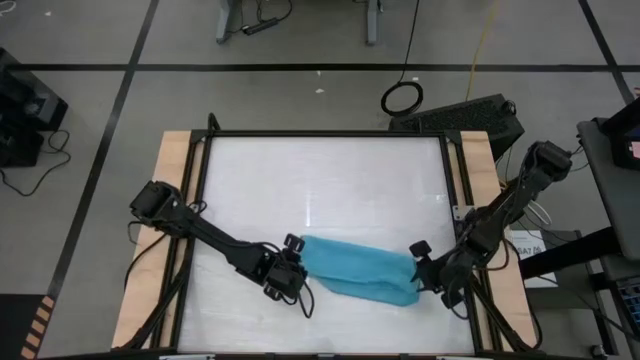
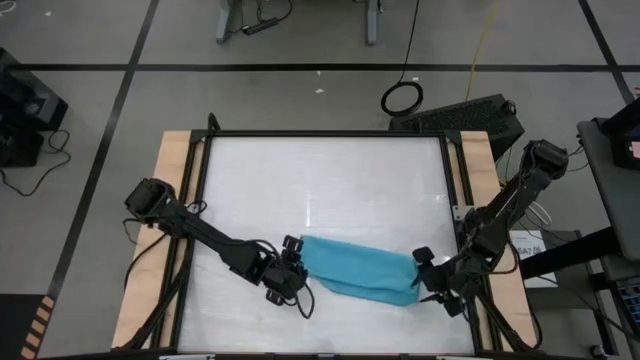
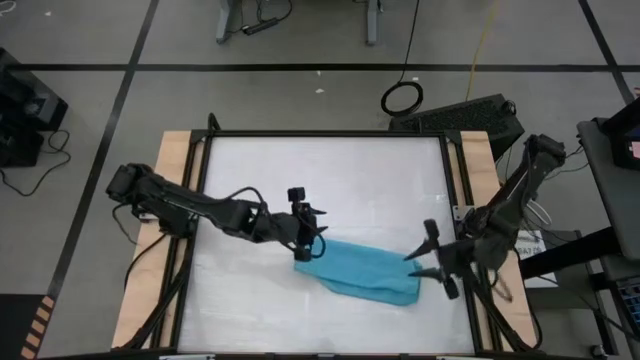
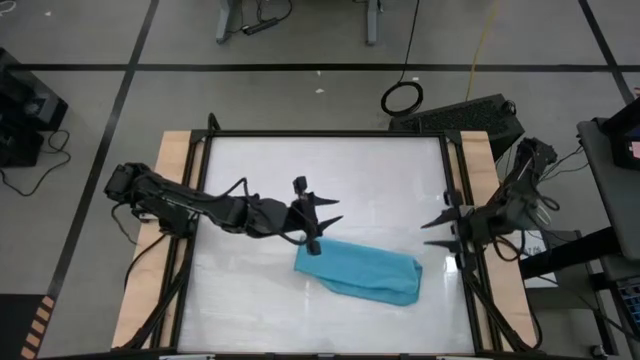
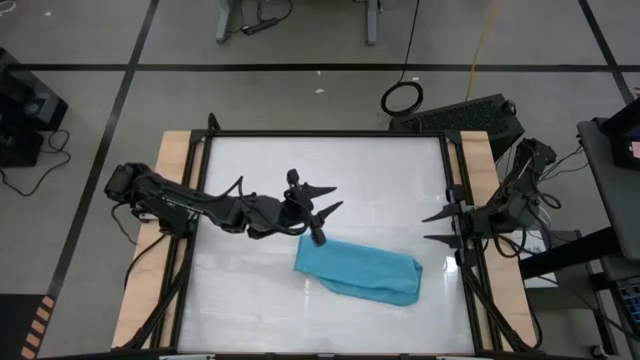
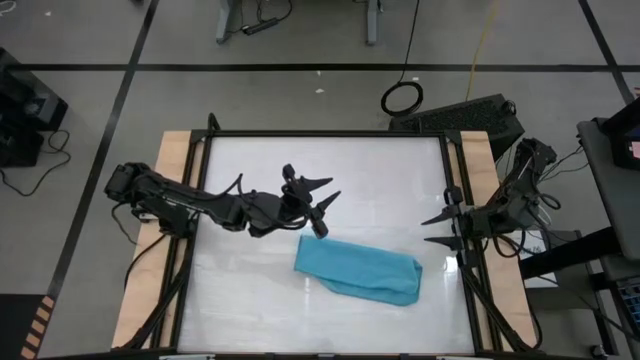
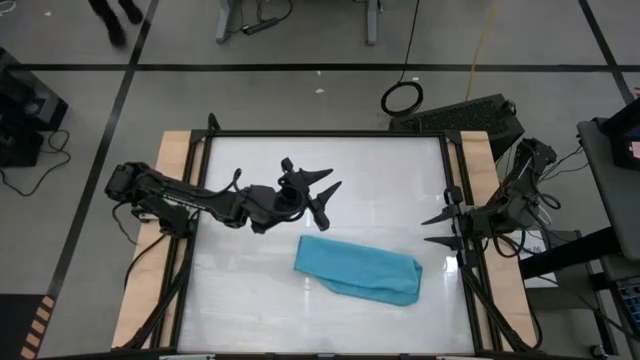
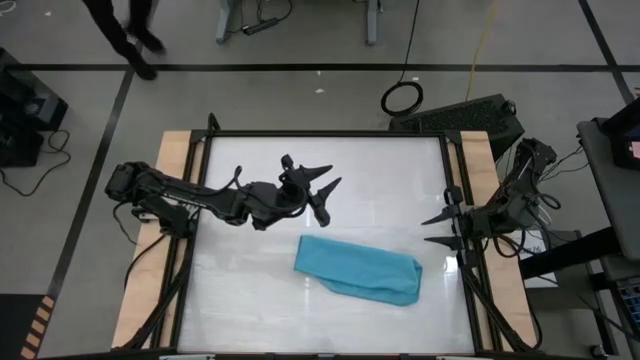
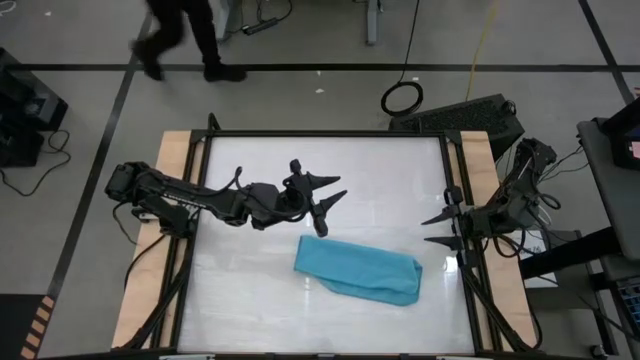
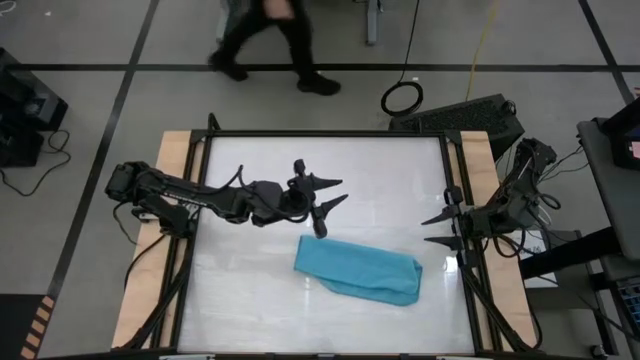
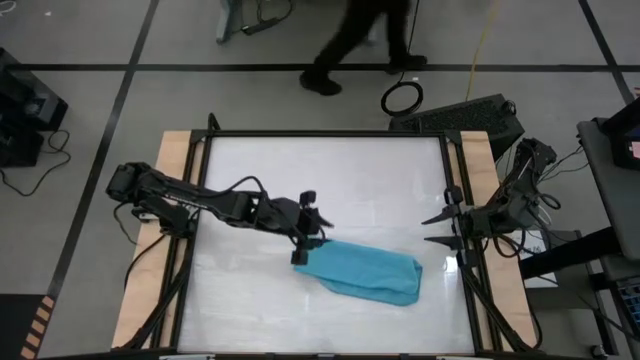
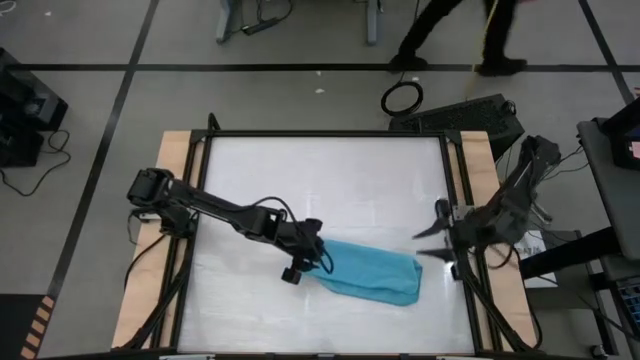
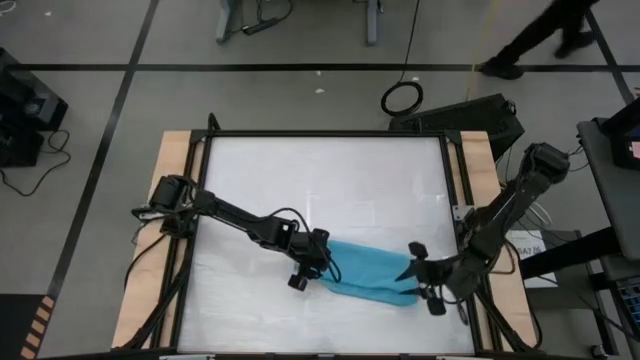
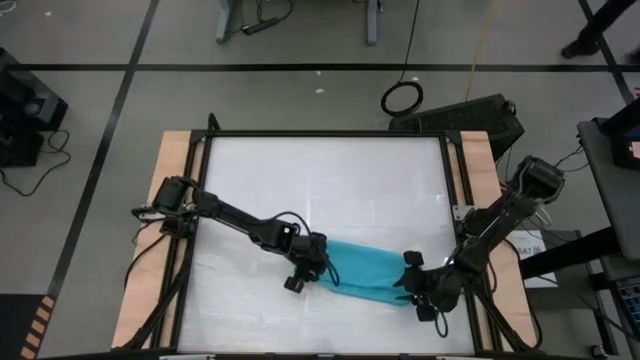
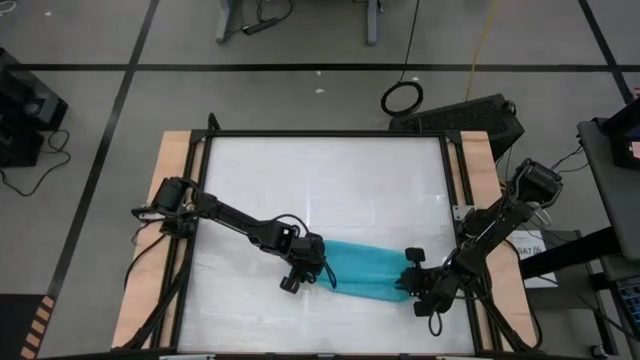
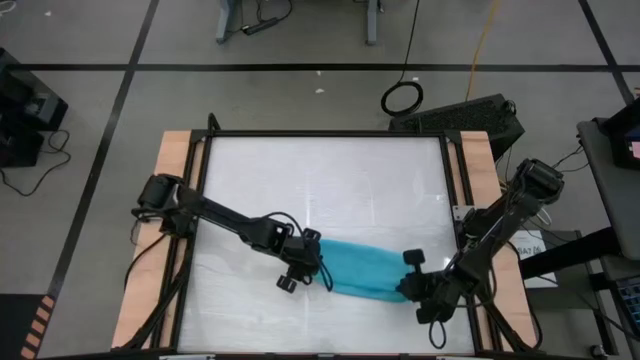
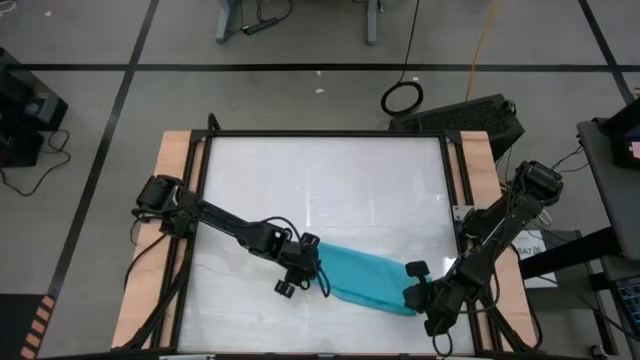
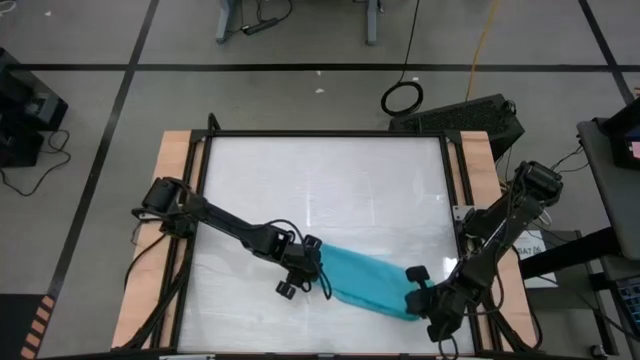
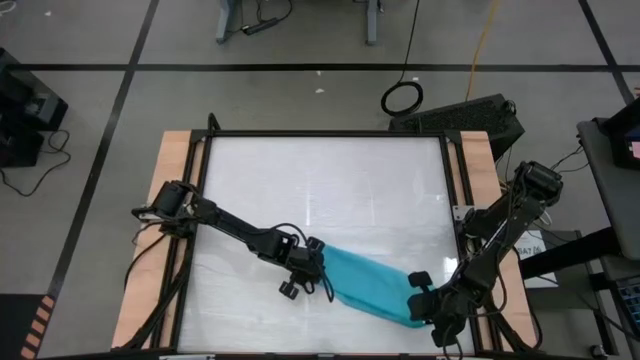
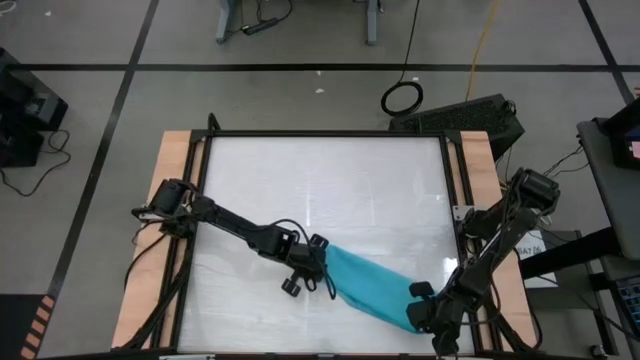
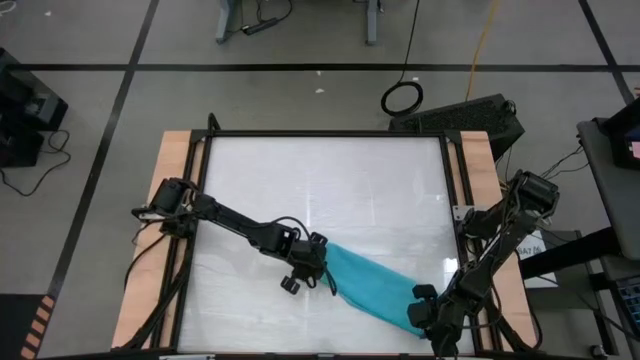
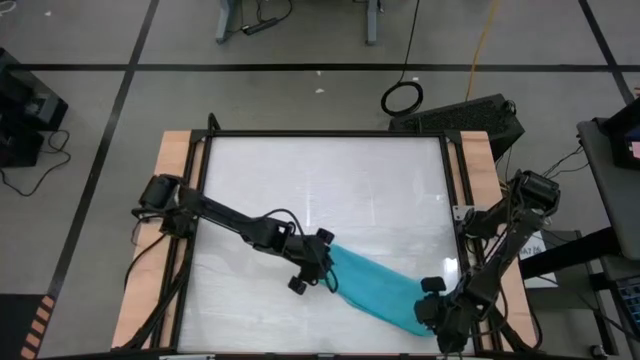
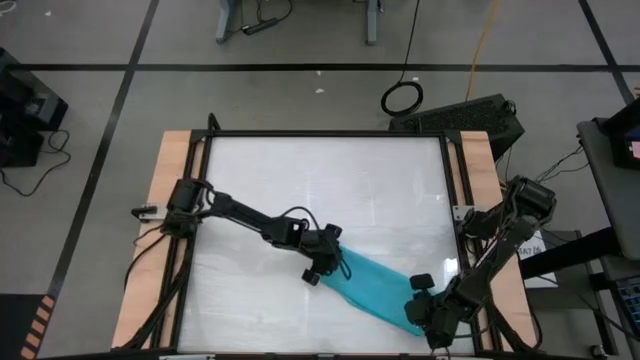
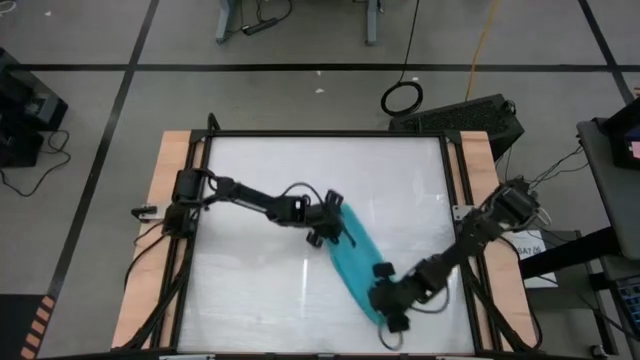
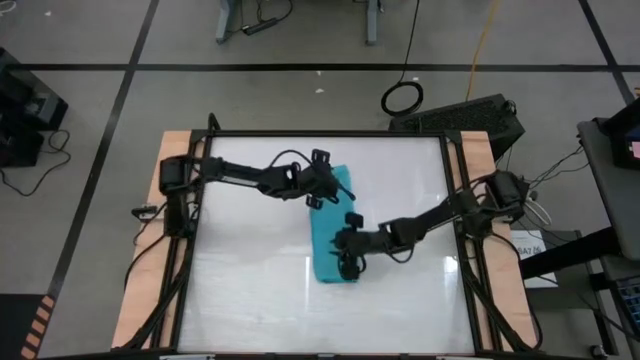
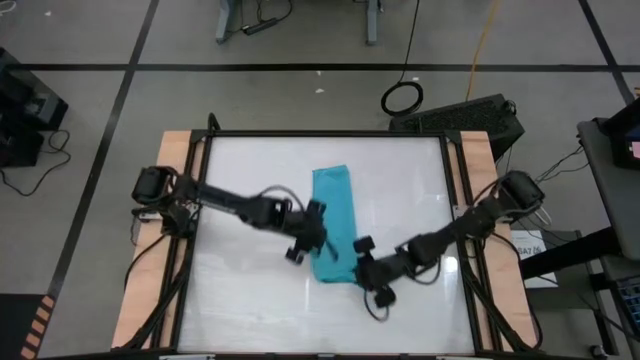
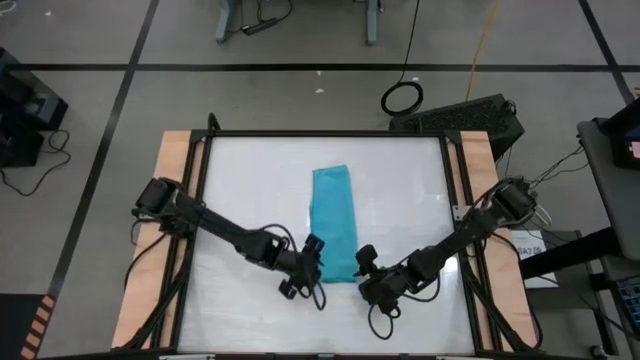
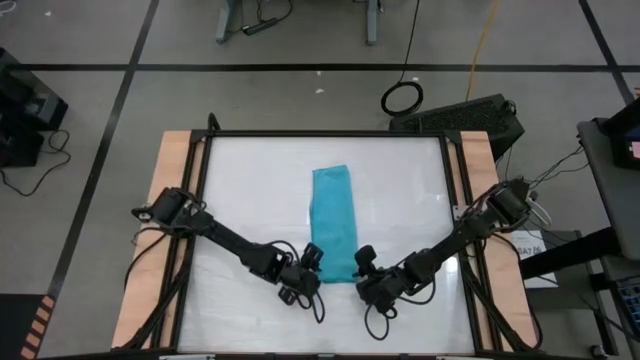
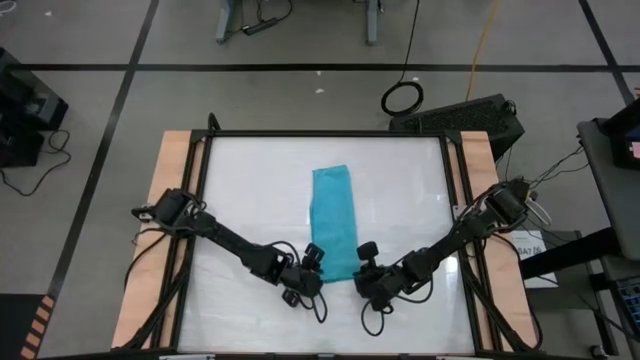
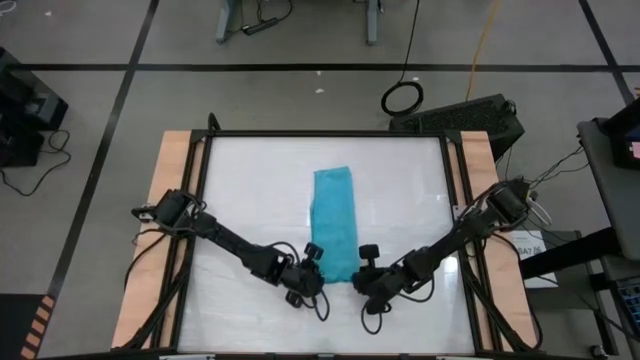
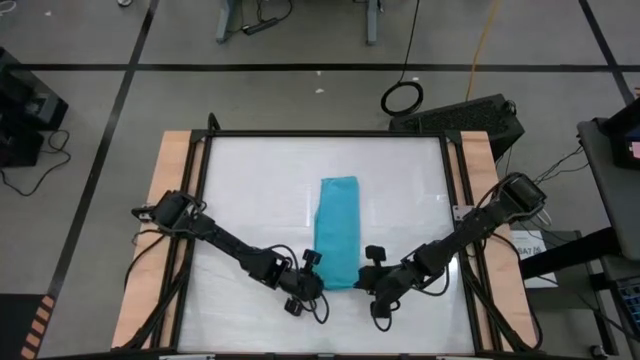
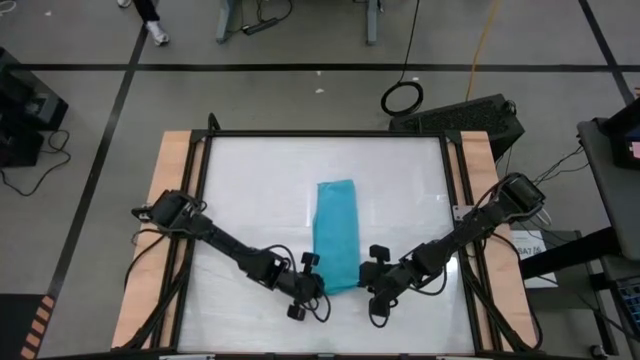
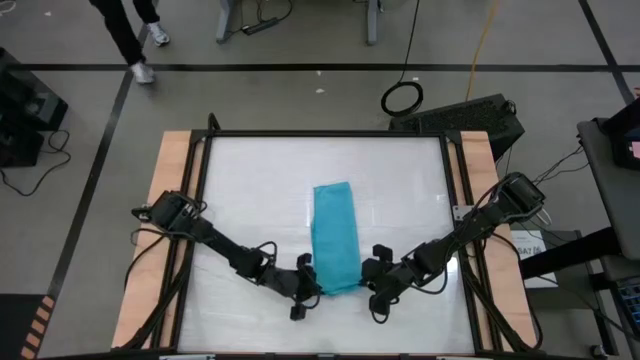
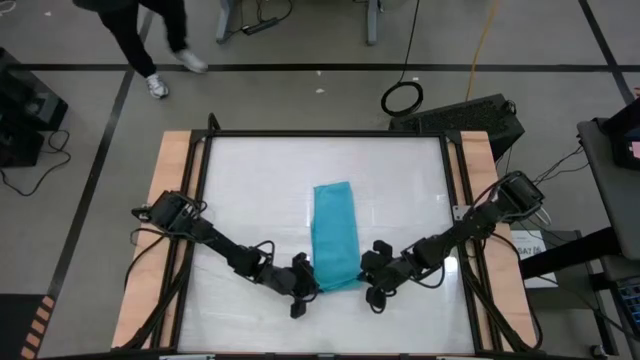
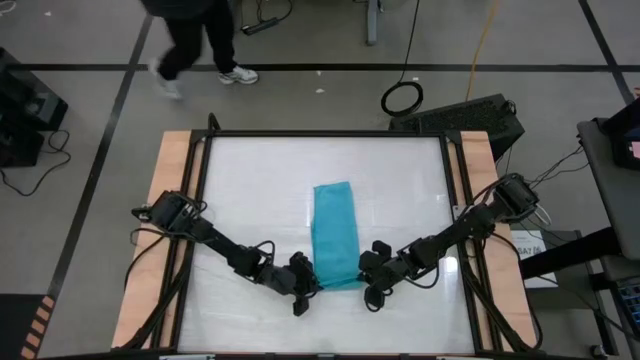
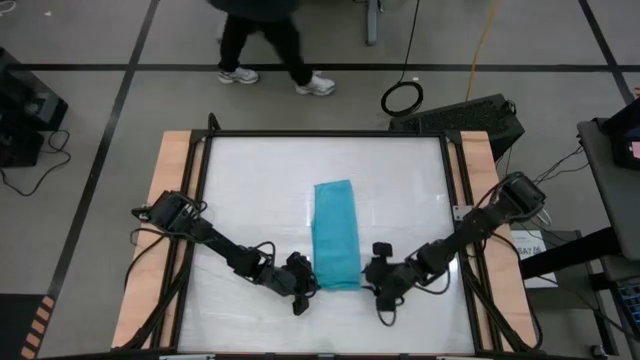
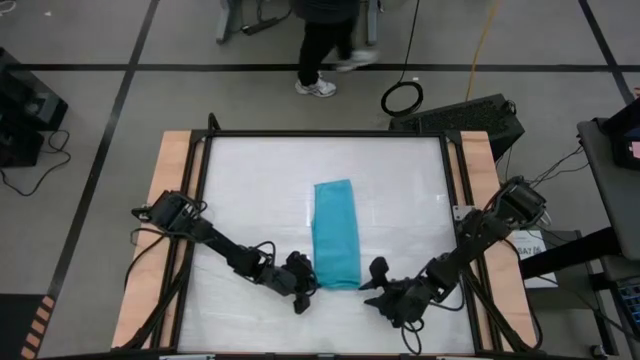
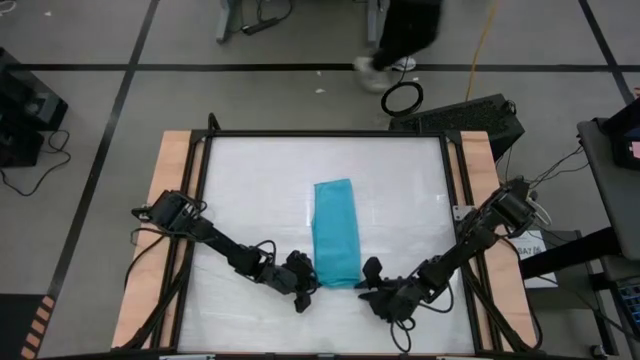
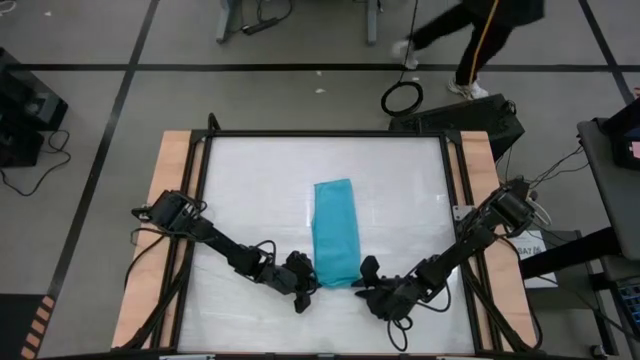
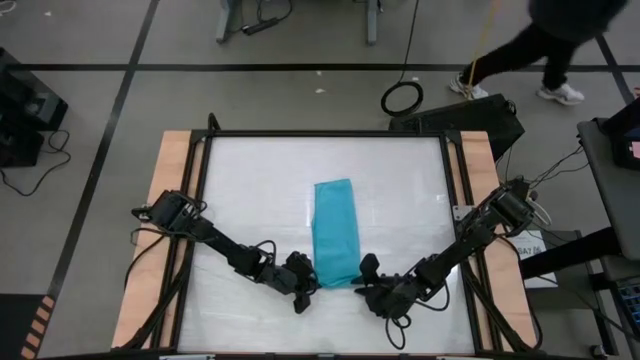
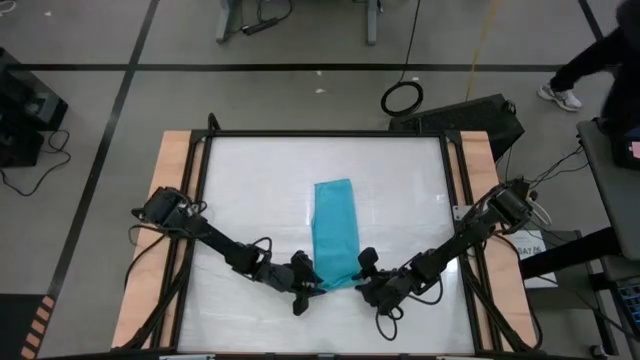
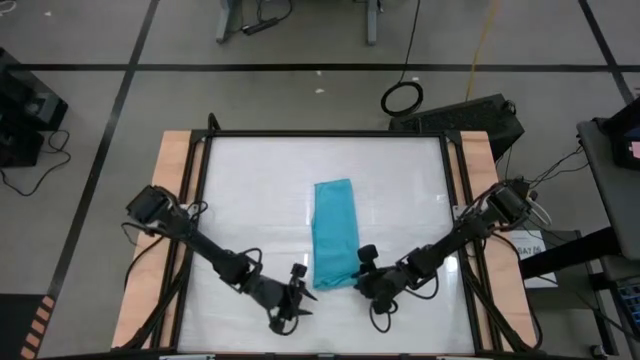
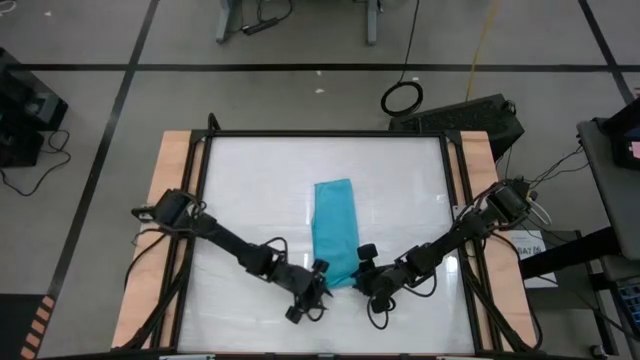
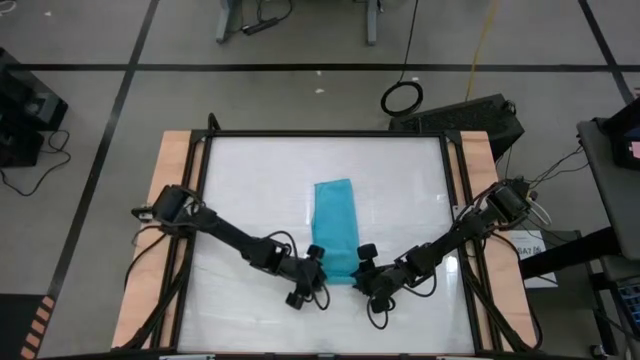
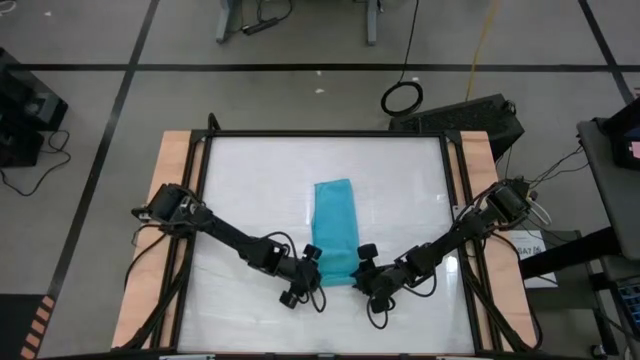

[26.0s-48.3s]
Task: Roll towel
Roll the blue microfiber cloth
